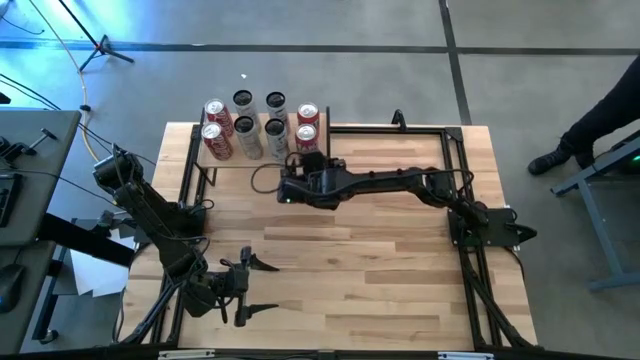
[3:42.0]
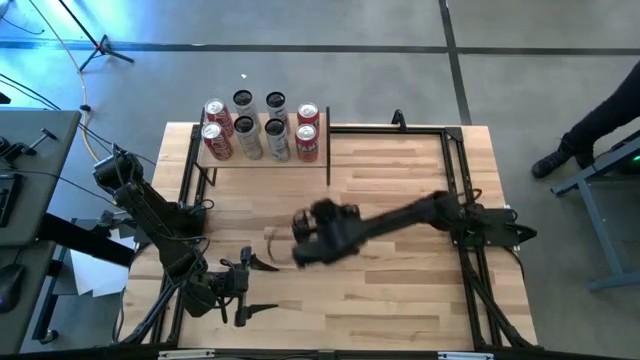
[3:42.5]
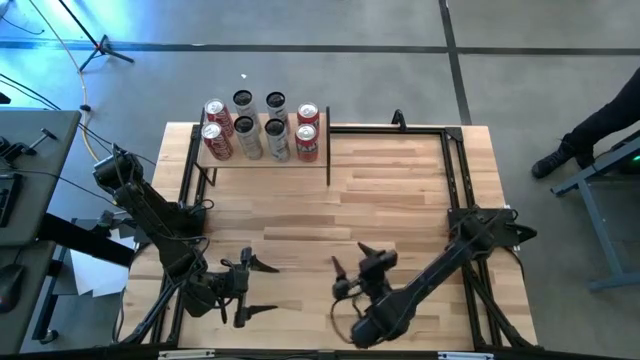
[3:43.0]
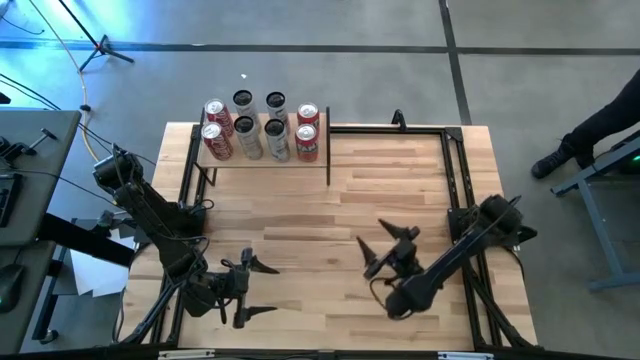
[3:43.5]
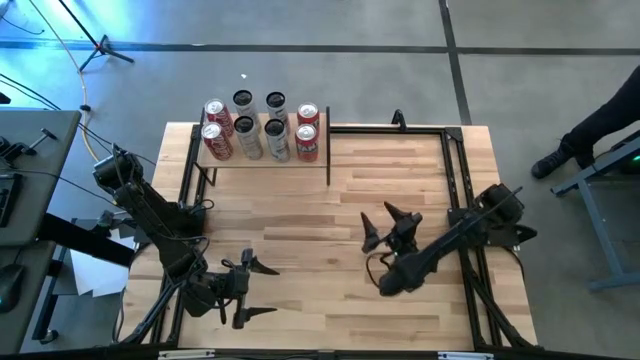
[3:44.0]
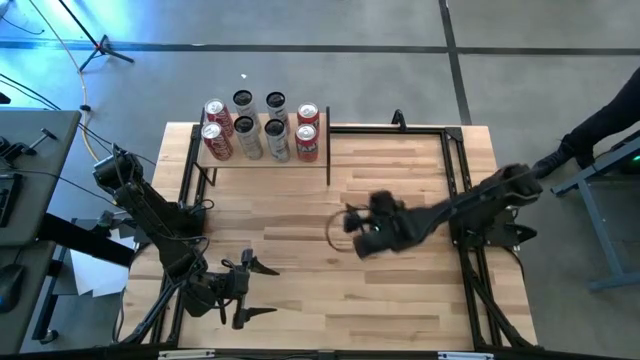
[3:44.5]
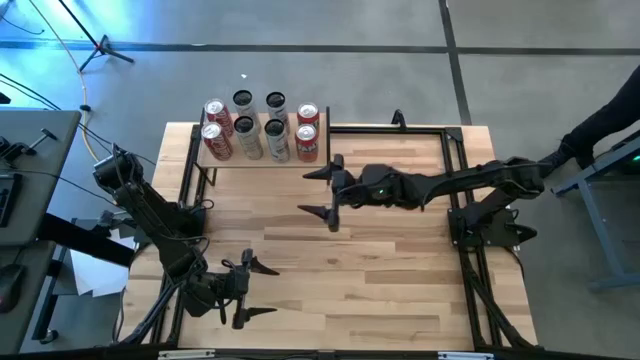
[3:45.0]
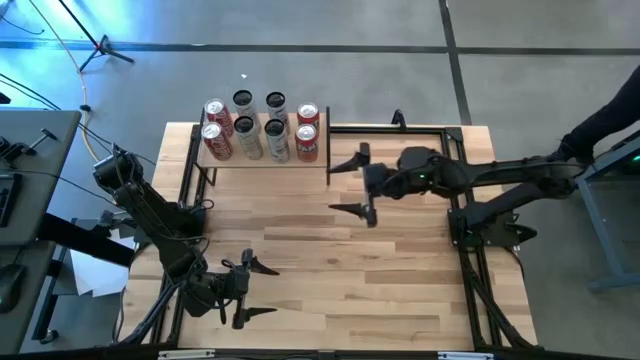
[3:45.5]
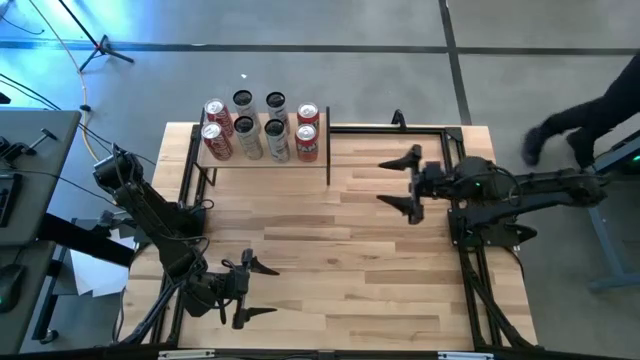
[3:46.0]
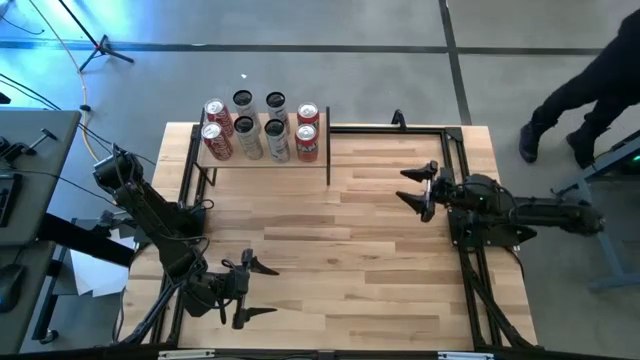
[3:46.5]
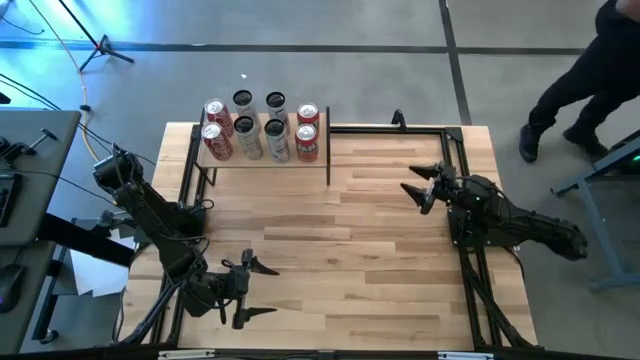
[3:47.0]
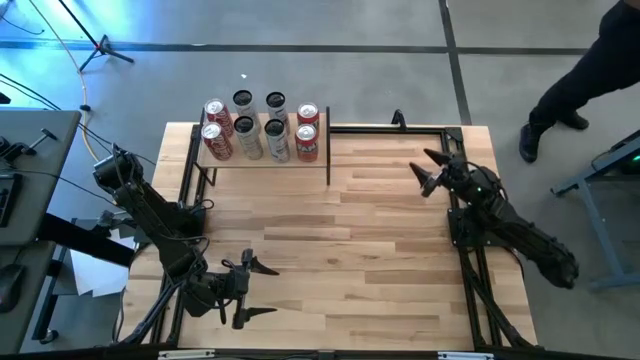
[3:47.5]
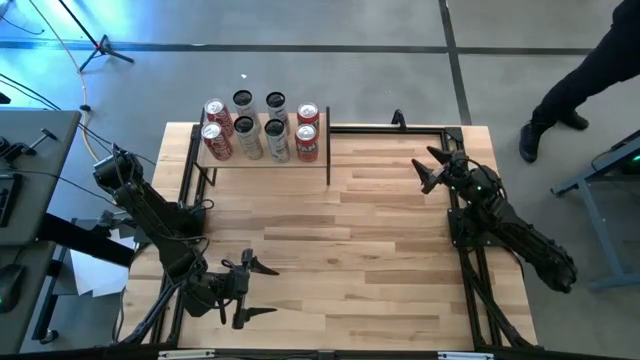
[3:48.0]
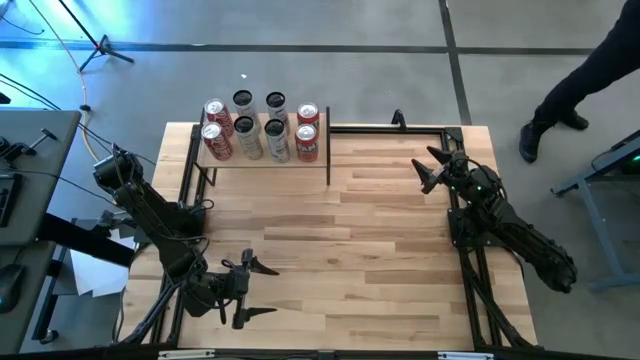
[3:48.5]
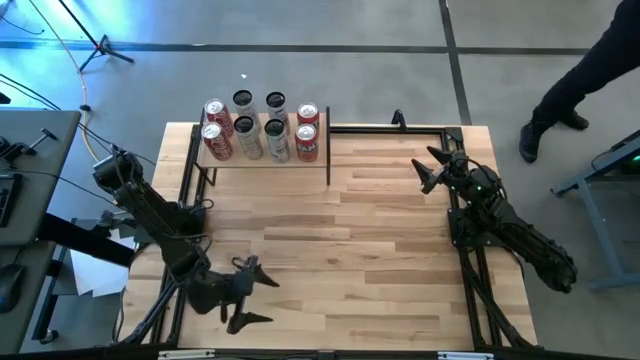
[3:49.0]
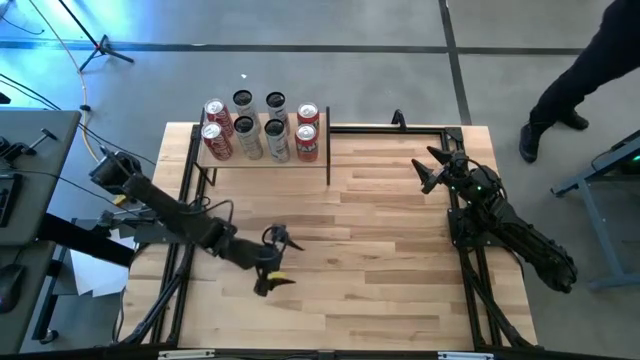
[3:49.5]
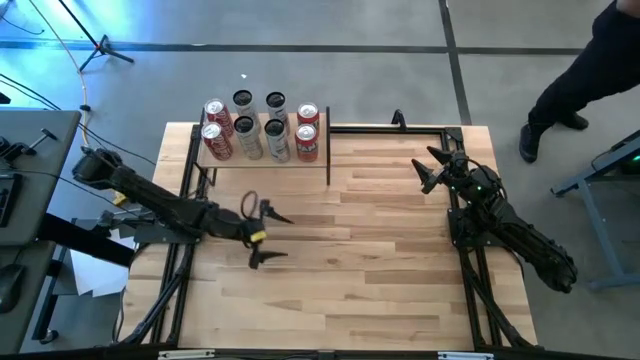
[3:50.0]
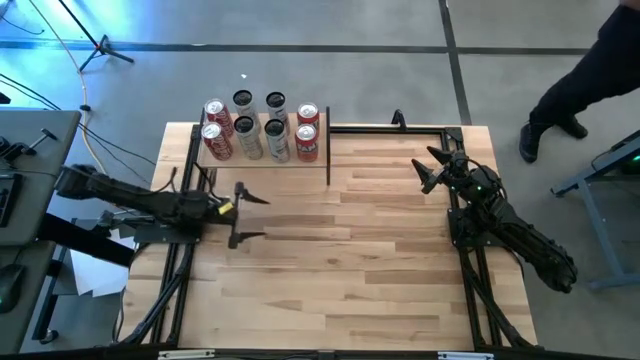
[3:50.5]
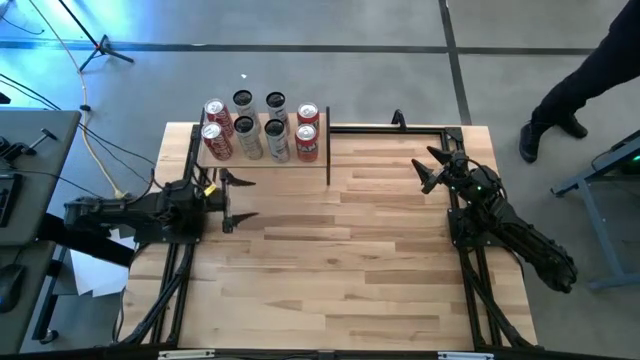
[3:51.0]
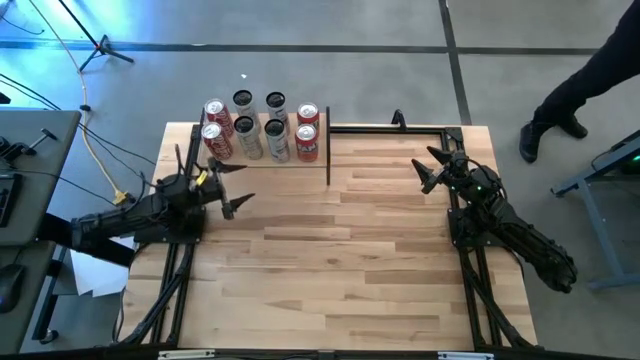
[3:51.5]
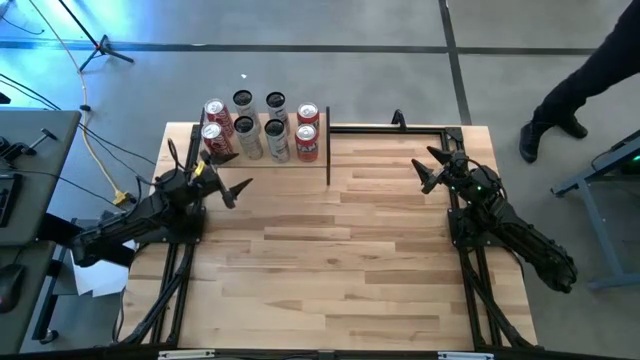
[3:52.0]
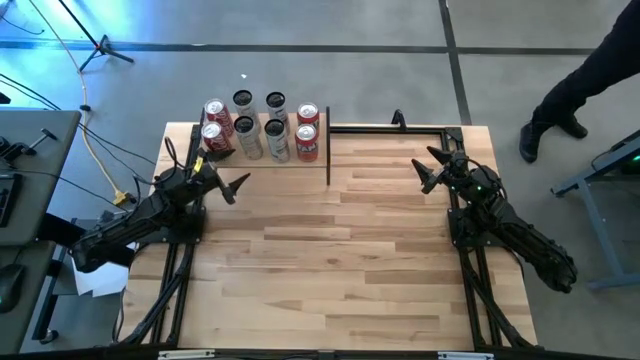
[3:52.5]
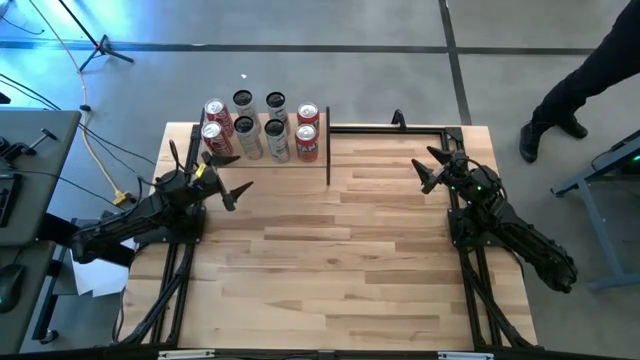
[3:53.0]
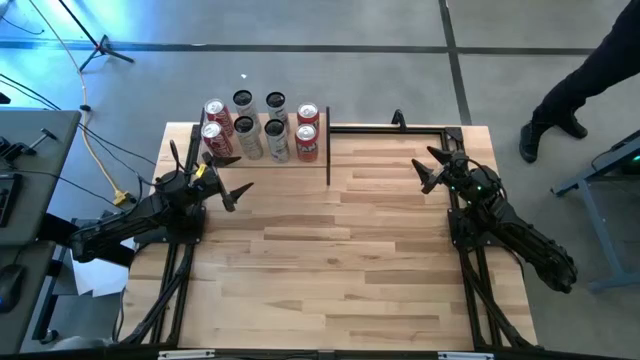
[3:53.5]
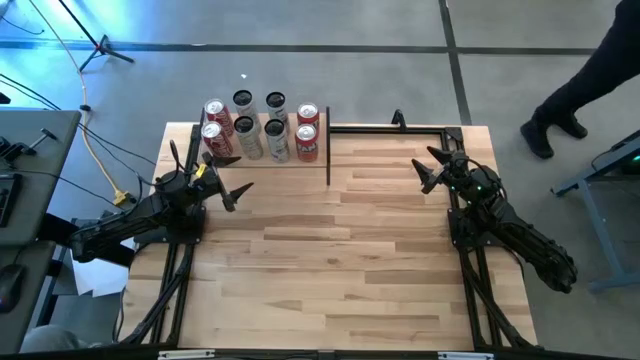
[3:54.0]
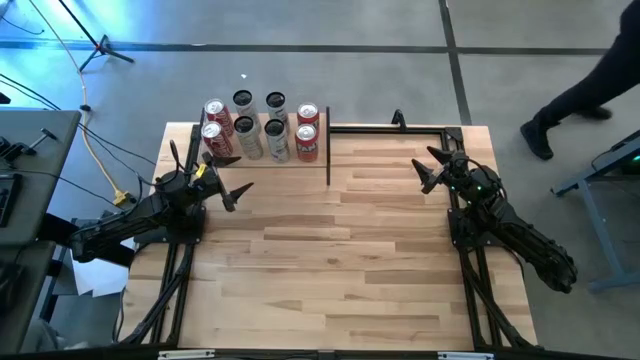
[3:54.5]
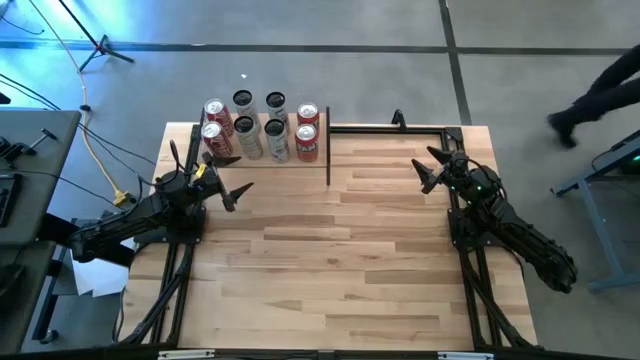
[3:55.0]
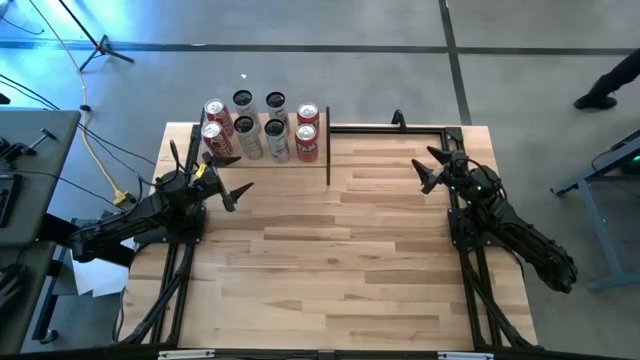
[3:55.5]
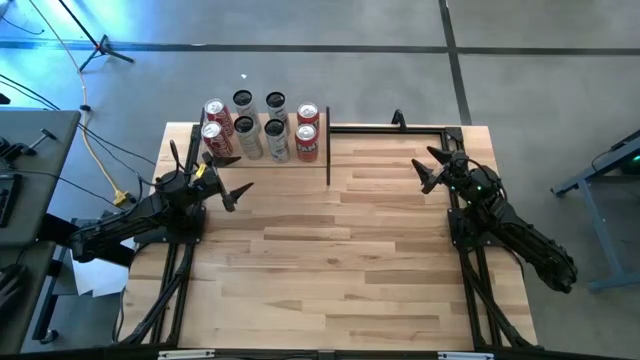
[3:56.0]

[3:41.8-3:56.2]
Task: Place canned beverage on shelf
Return to Home Position

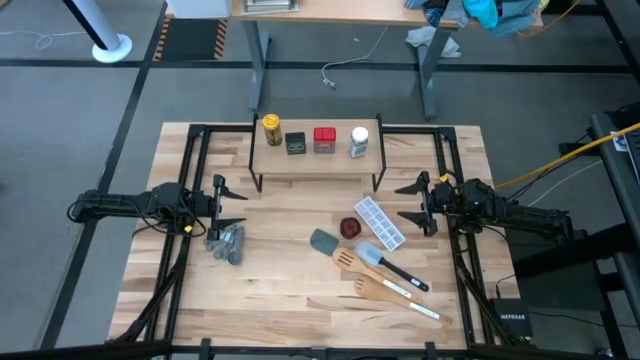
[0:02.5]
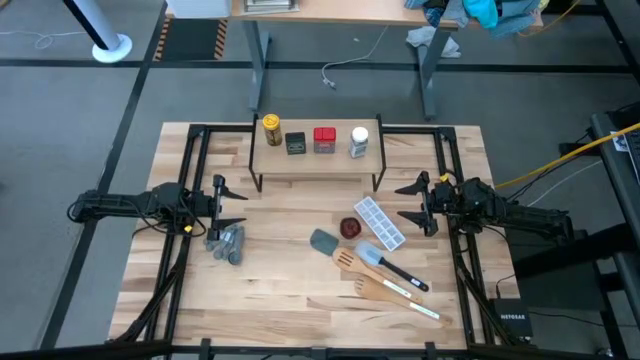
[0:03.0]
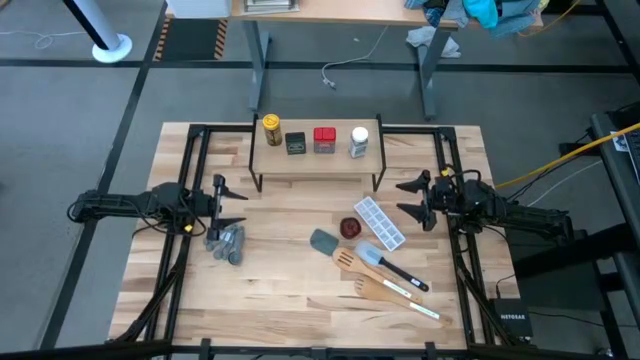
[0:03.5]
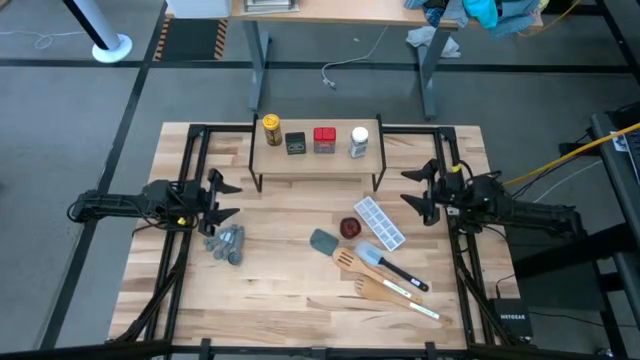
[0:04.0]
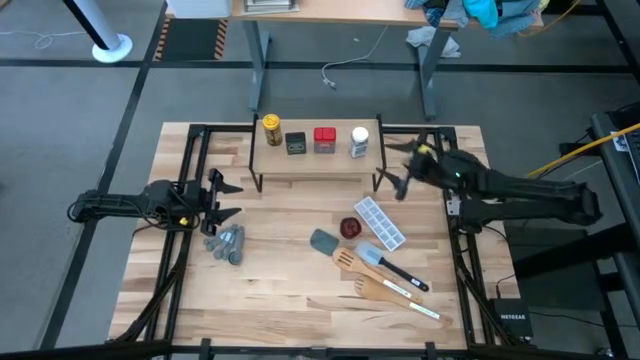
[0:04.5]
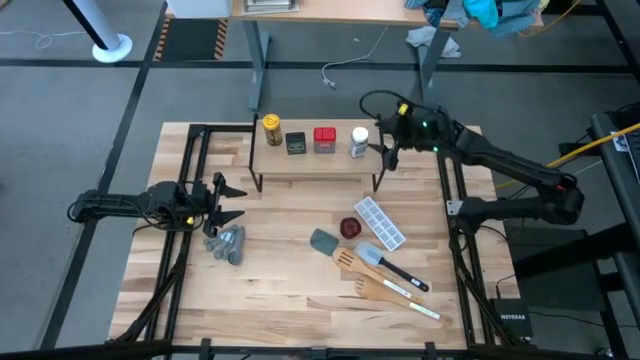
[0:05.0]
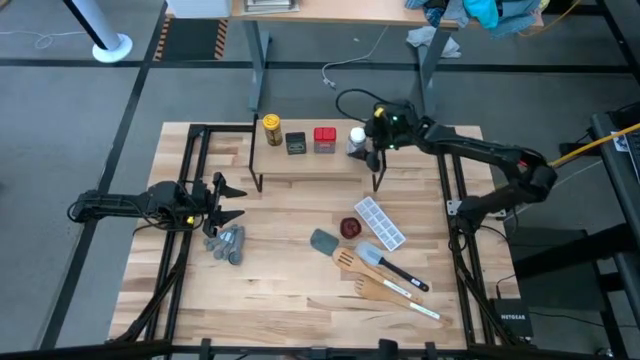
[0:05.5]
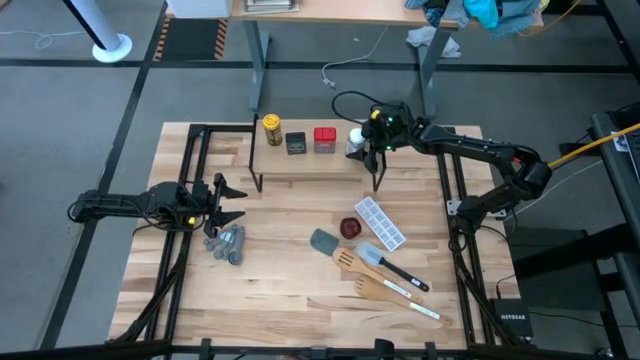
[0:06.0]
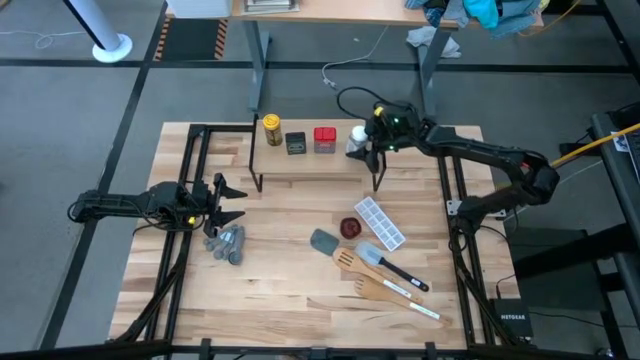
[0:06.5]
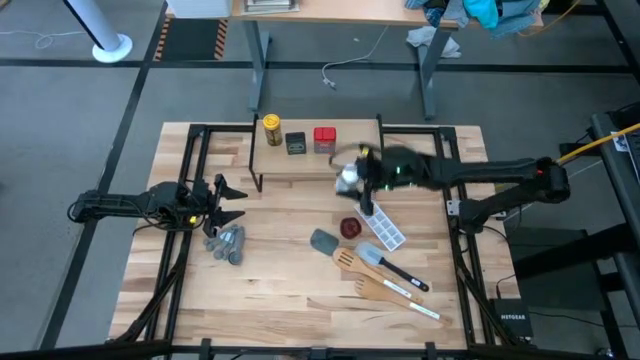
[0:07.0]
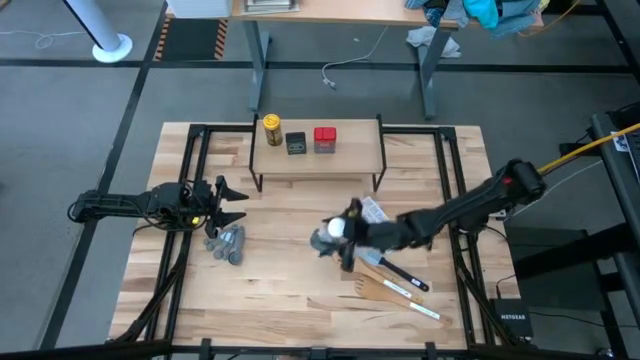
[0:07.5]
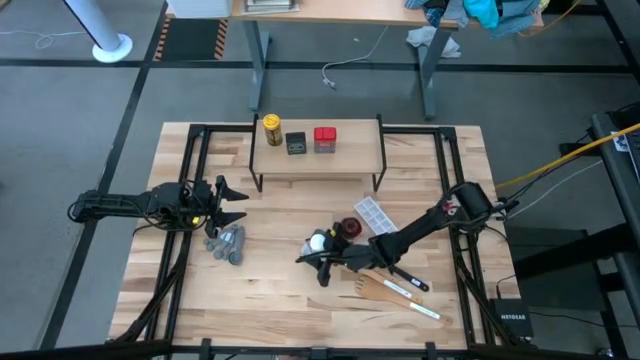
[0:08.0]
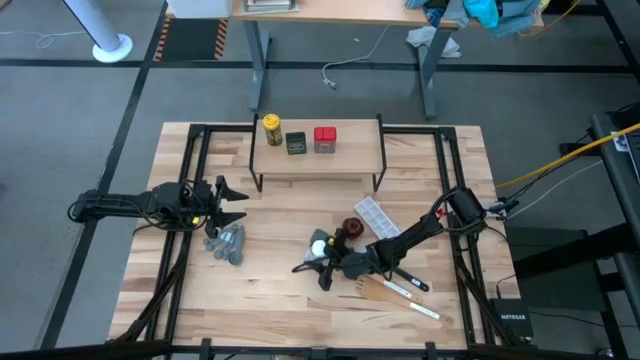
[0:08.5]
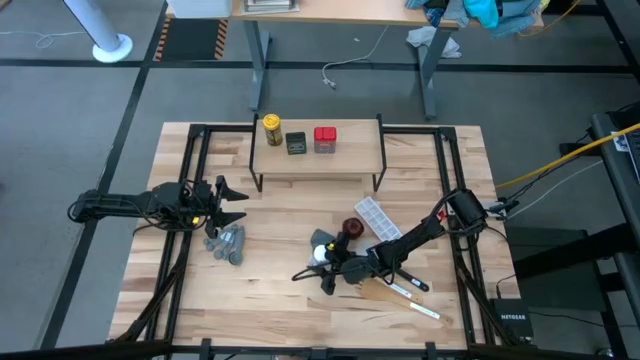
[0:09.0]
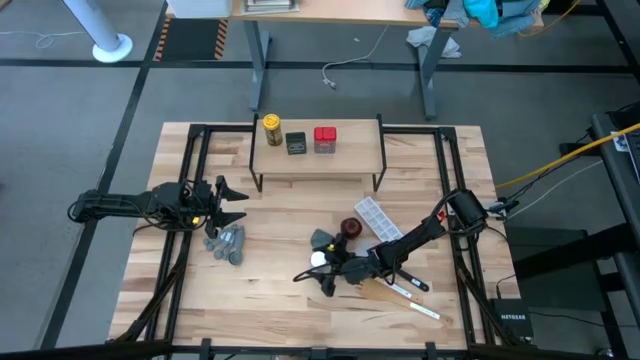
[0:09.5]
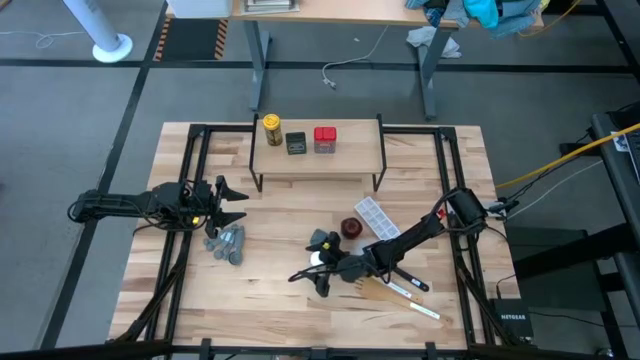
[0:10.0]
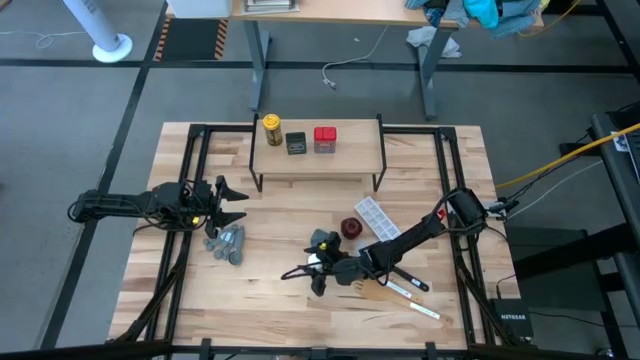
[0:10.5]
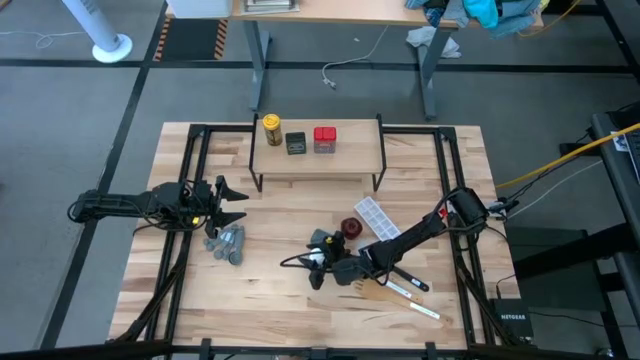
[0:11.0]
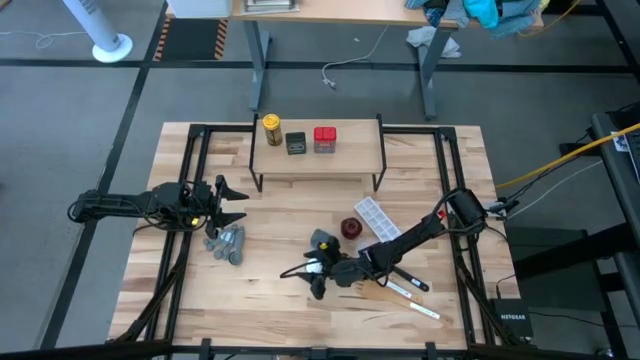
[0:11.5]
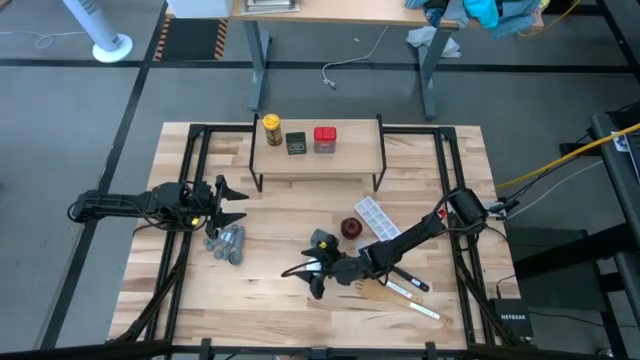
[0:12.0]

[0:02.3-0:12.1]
Task: Shelf spices
Remove the white seasoning bottle from the shelf
